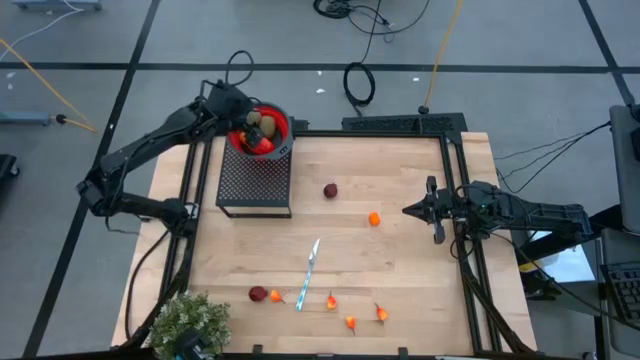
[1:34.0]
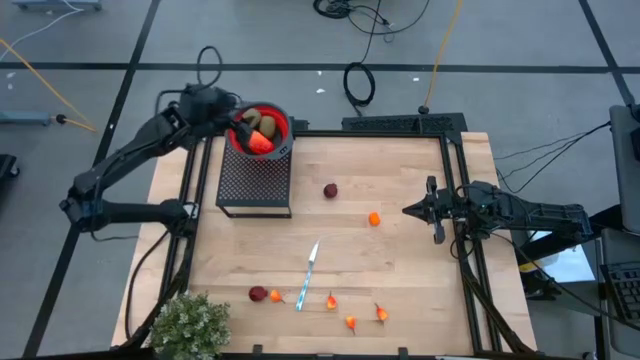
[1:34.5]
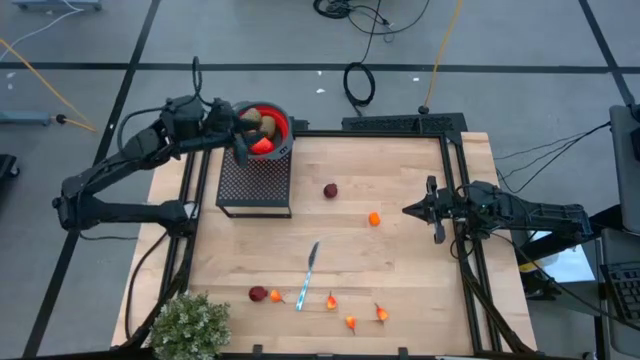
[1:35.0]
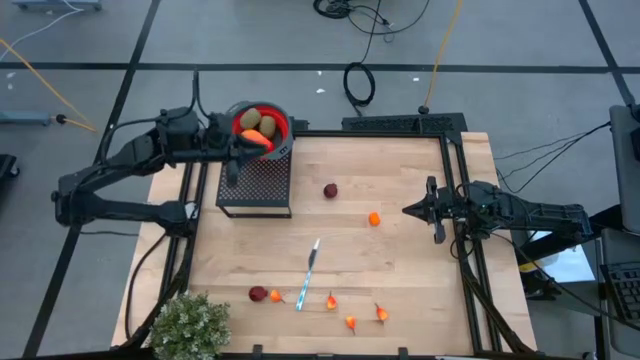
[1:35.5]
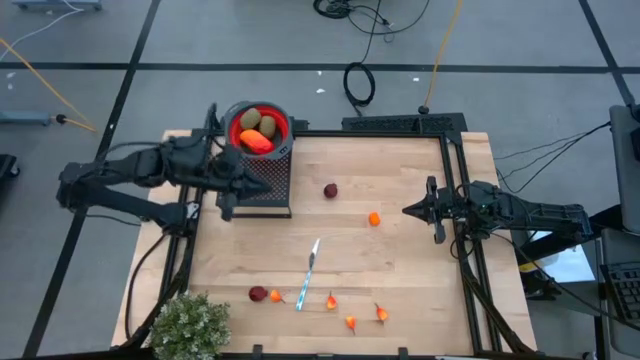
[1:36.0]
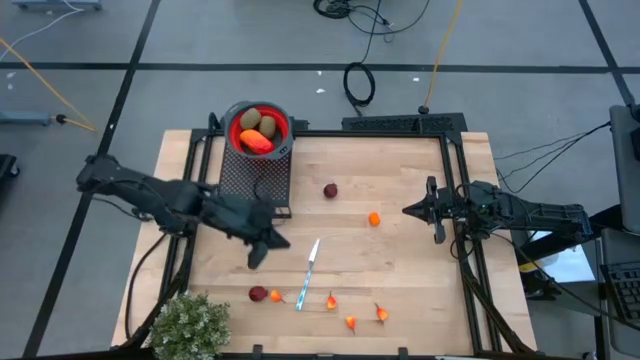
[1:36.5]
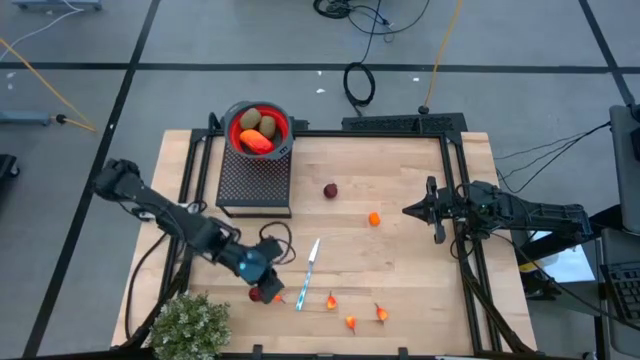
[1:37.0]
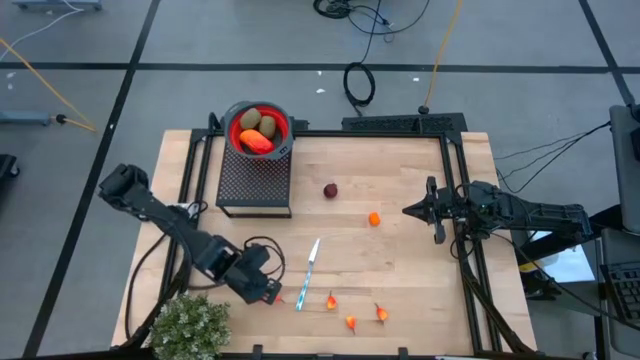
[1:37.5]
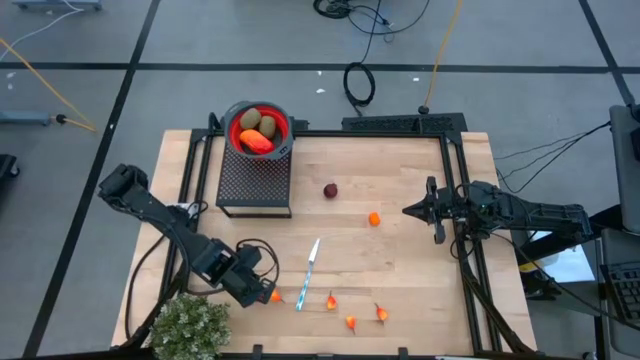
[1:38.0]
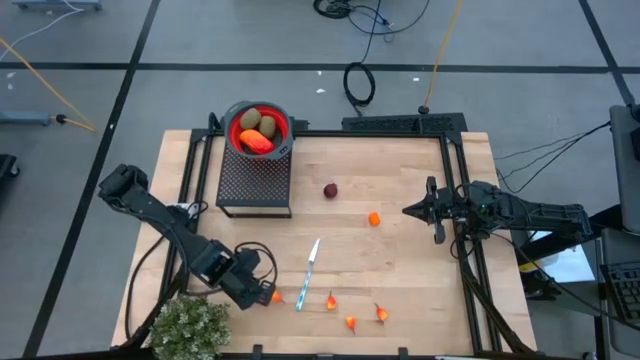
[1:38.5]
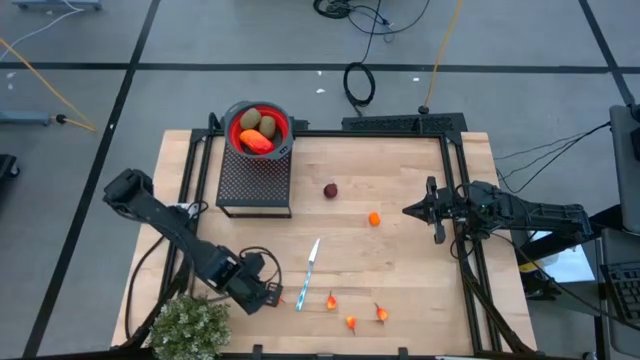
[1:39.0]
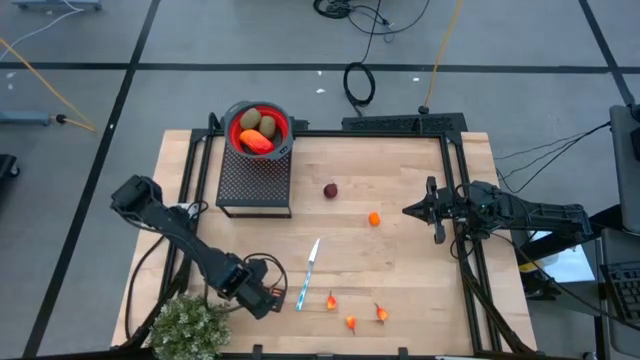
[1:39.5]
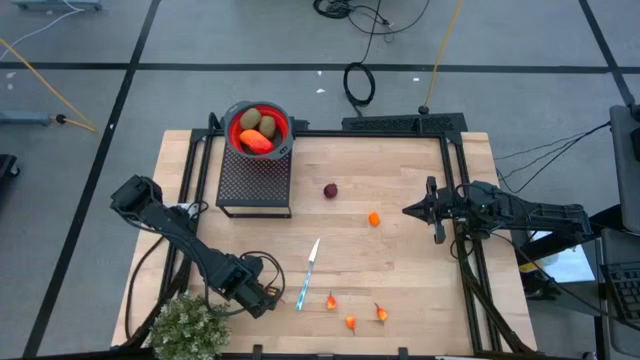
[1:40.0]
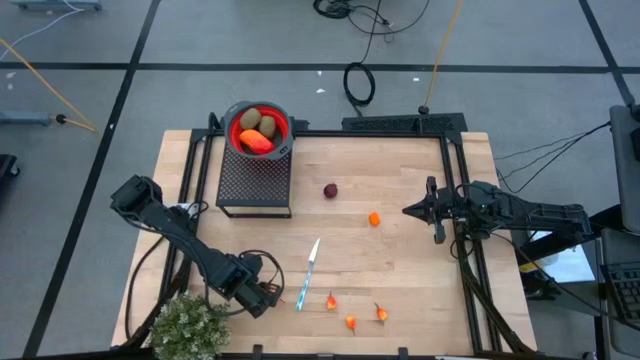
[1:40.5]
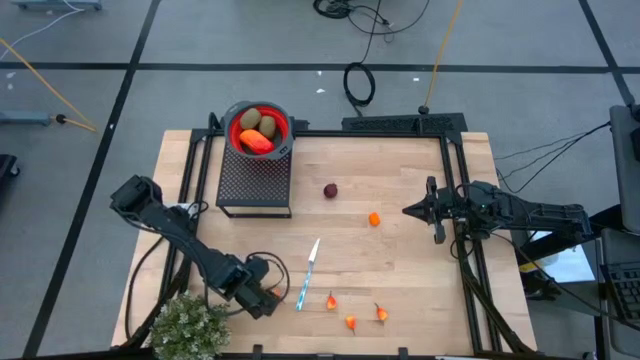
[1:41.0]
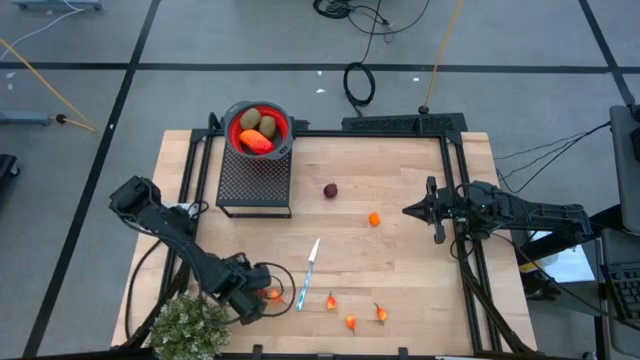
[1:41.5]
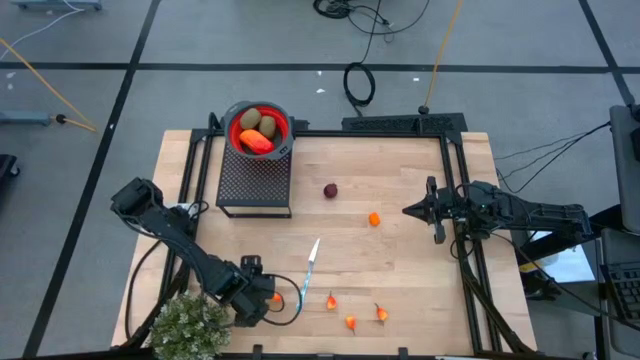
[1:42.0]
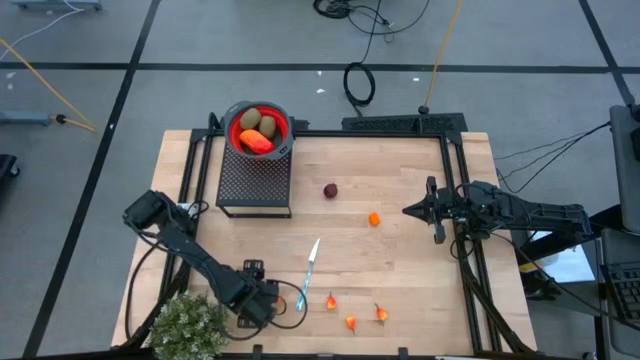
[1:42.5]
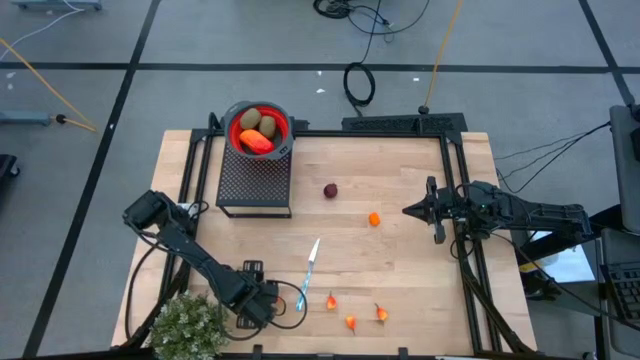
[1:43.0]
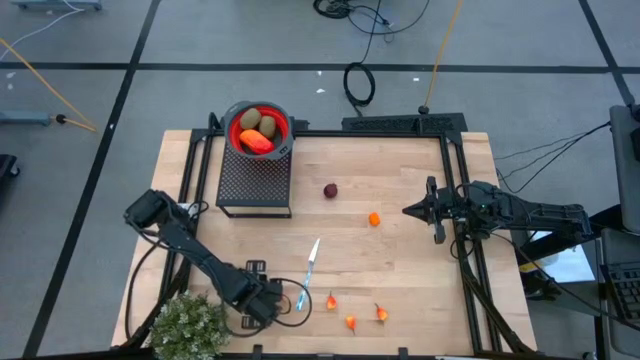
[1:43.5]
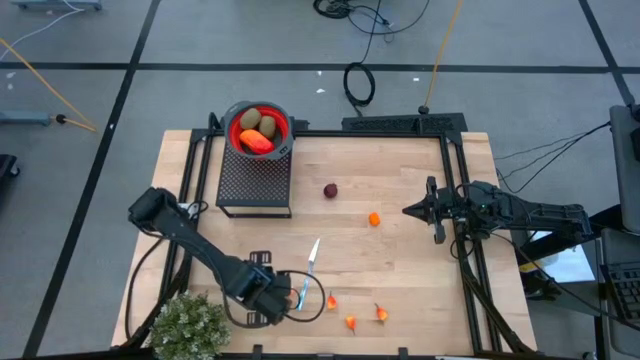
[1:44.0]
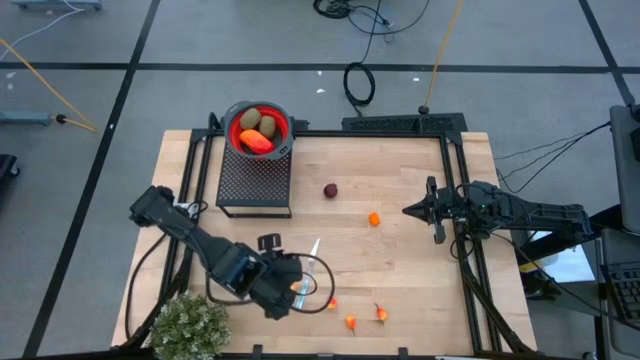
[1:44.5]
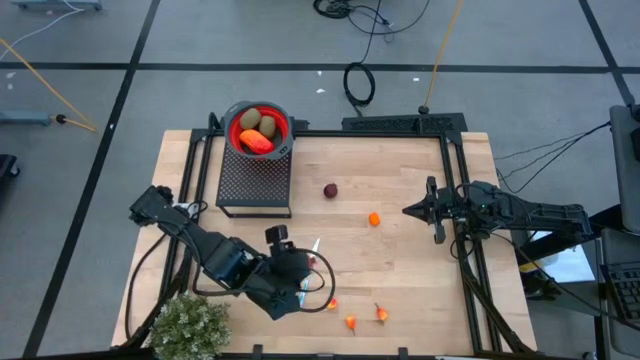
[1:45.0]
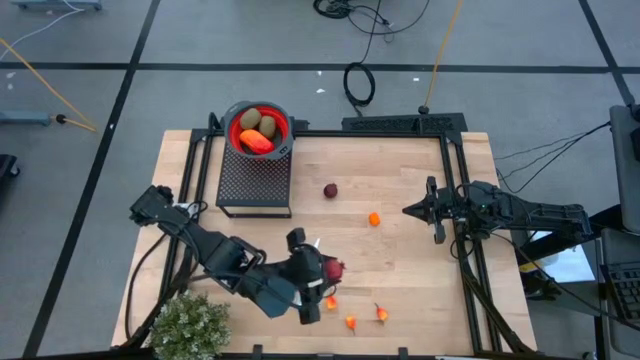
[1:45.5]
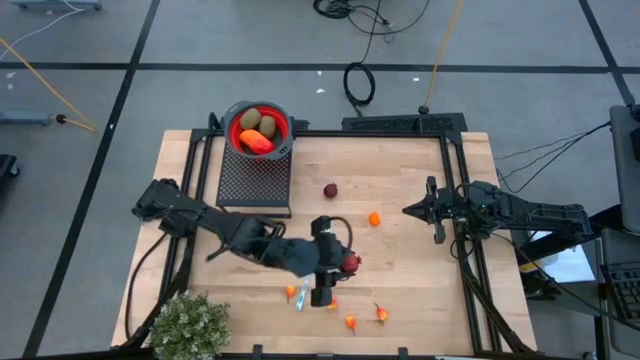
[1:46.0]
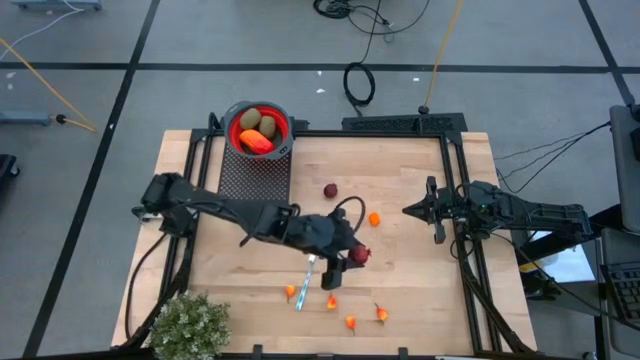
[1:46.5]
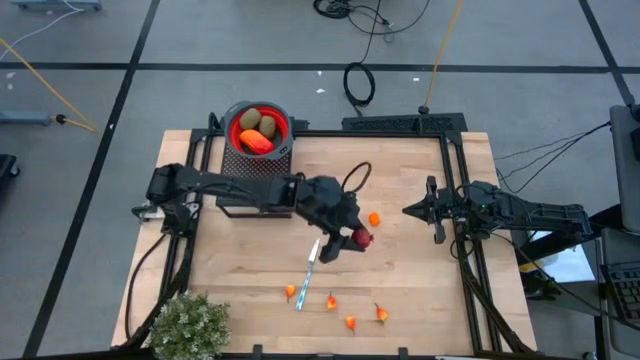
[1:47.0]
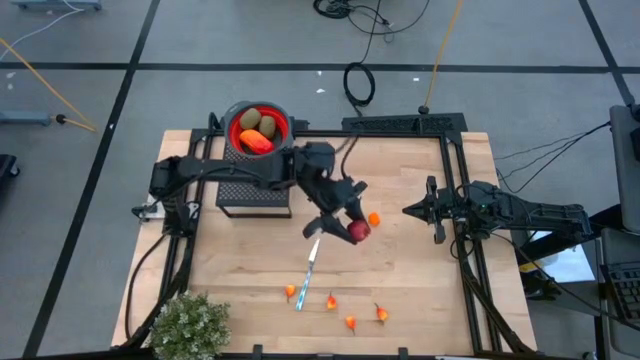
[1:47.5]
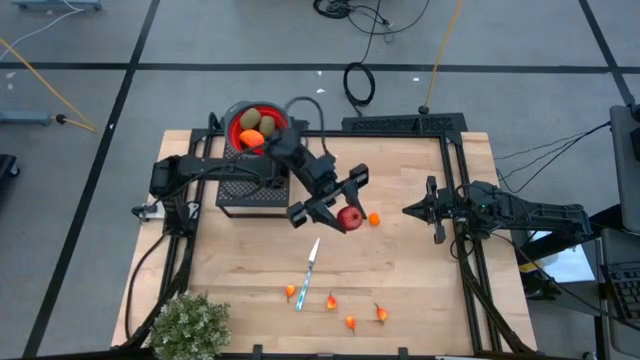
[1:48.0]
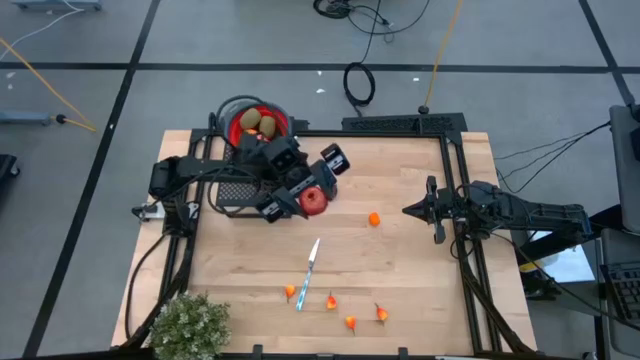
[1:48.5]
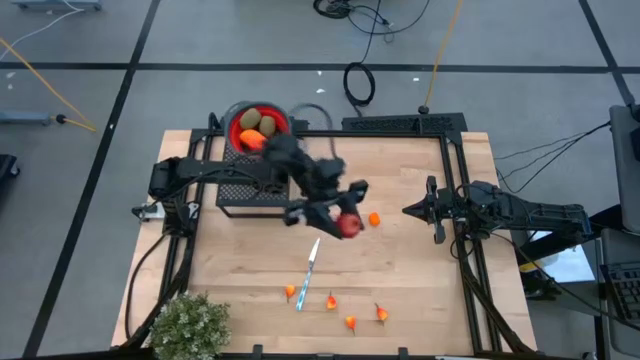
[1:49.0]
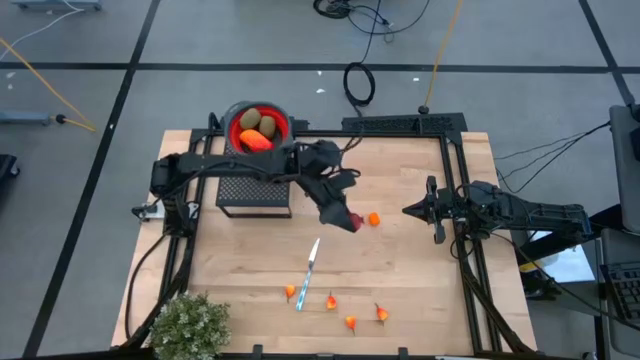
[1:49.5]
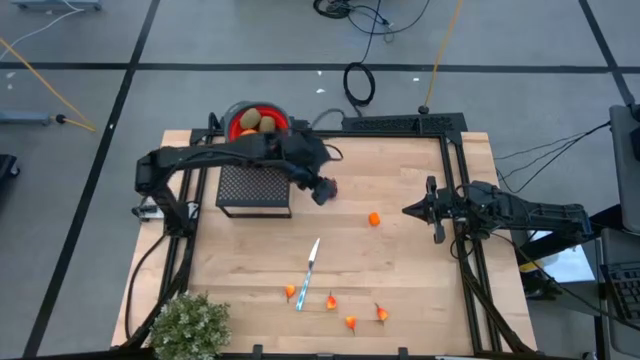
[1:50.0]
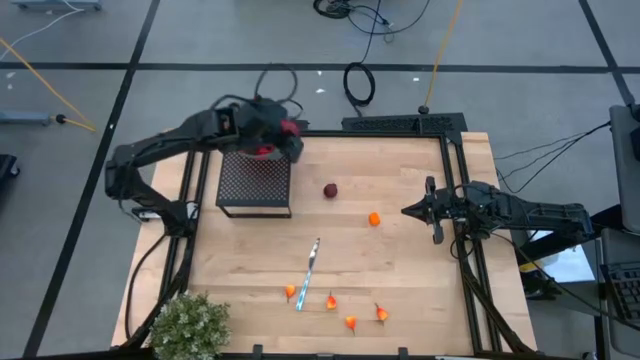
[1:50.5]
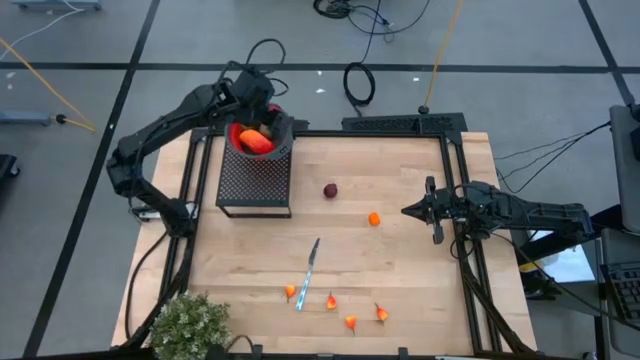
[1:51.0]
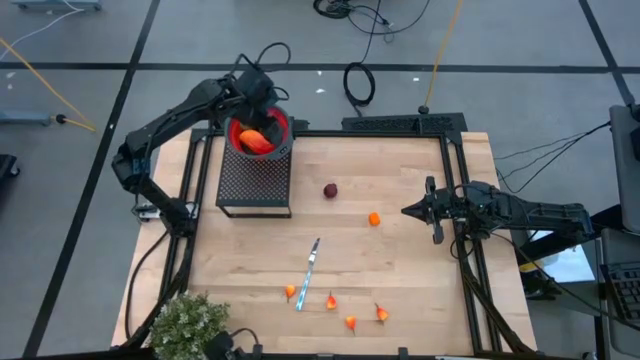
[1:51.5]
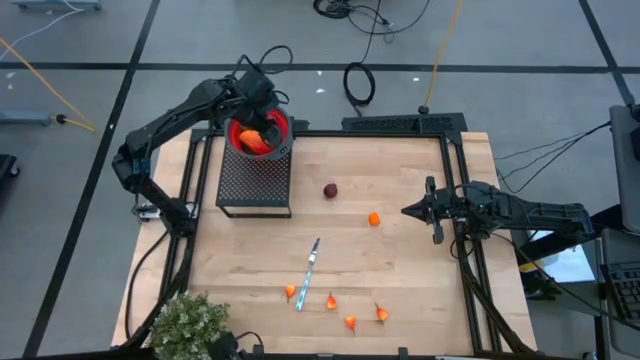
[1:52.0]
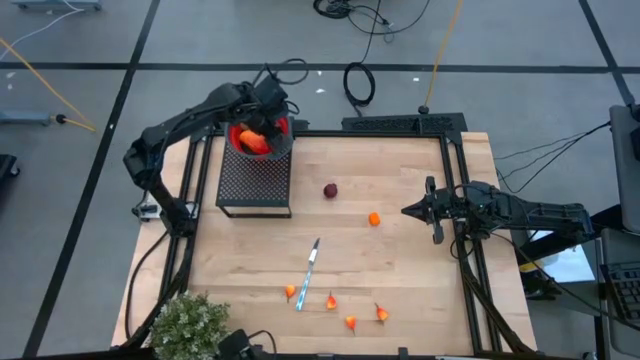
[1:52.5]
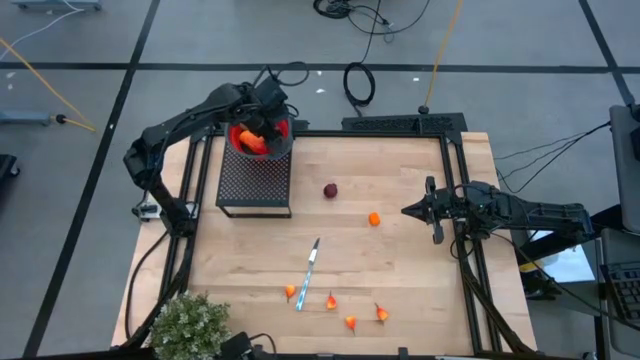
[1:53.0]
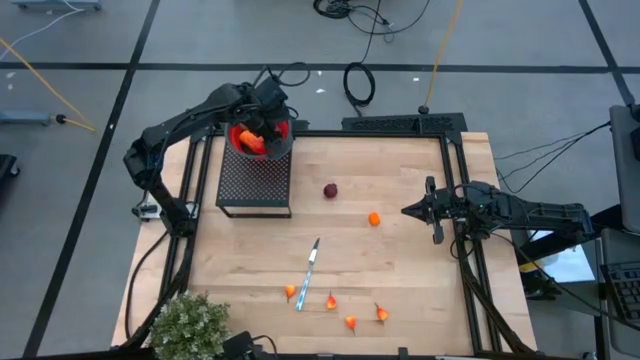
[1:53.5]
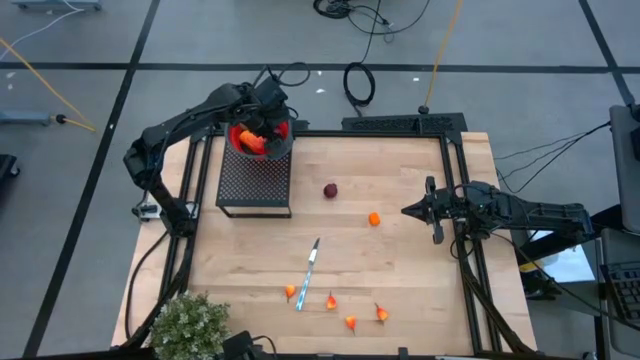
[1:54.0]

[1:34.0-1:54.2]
Task: Pick & Place Fruit
Put the red pomegranate into the red strainer bowl on the shelf

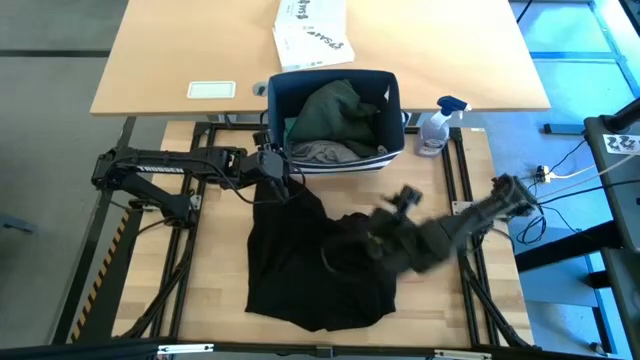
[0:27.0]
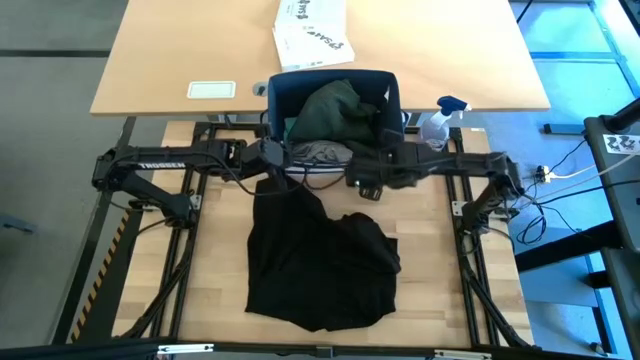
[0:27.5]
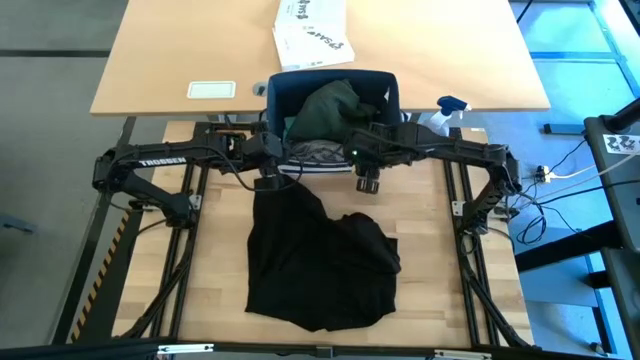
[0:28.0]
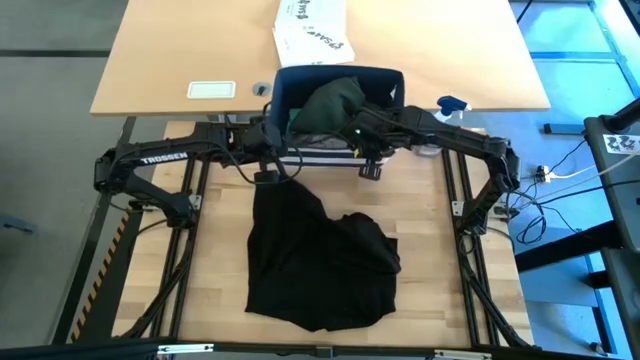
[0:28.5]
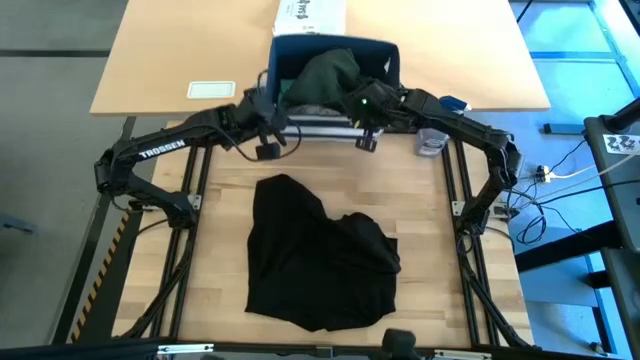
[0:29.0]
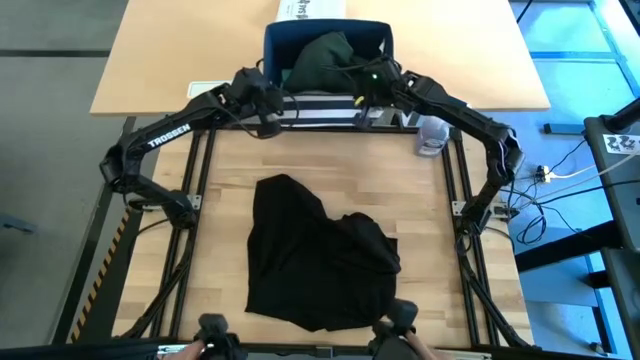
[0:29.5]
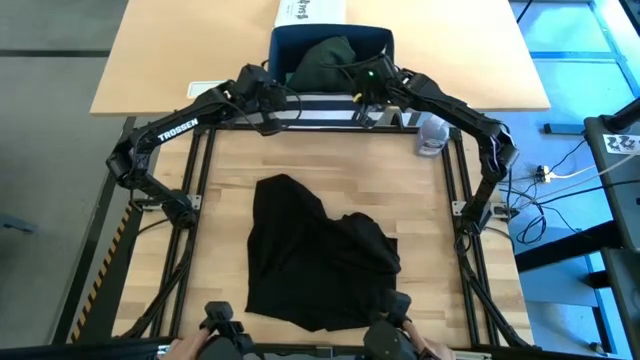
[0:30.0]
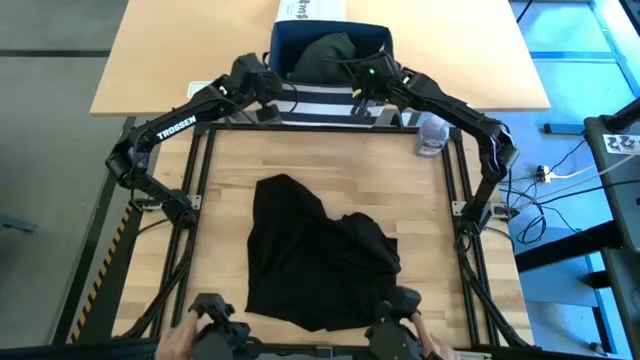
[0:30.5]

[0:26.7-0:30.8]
Task: Fold Laundry from Bin
Adjust the blue bin
